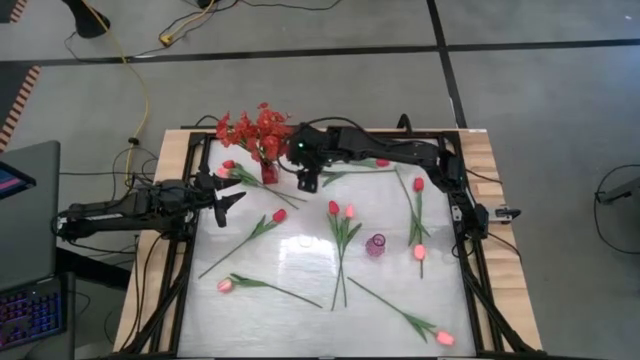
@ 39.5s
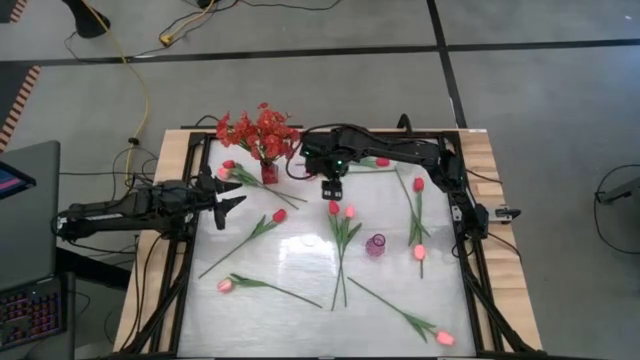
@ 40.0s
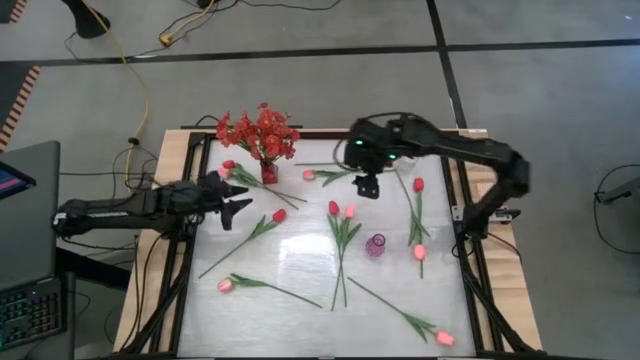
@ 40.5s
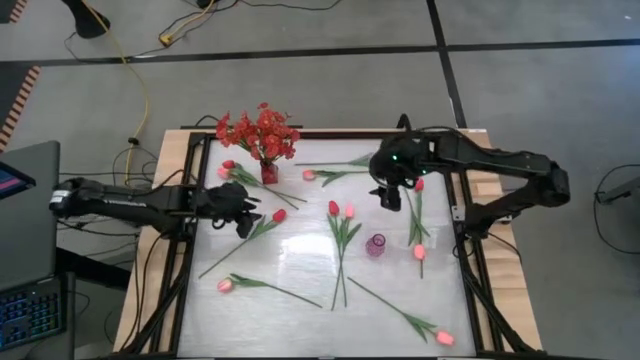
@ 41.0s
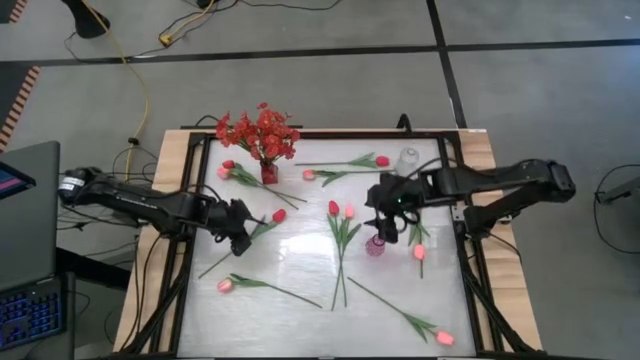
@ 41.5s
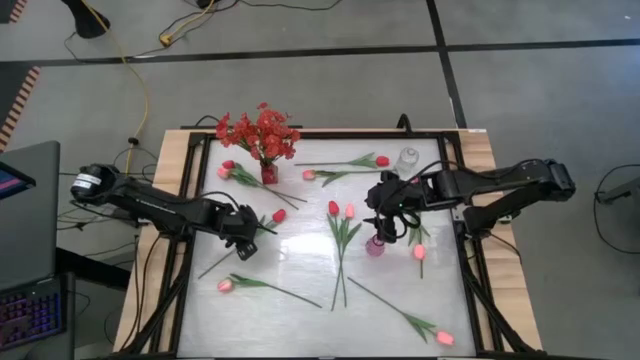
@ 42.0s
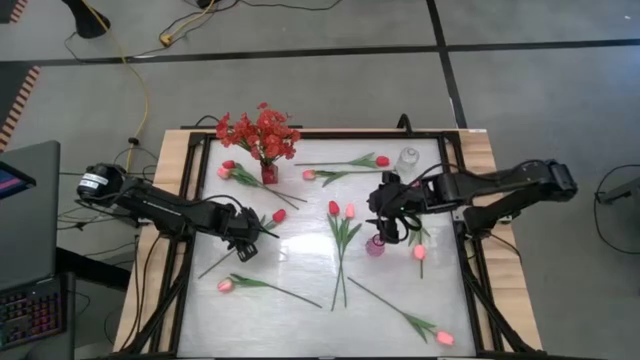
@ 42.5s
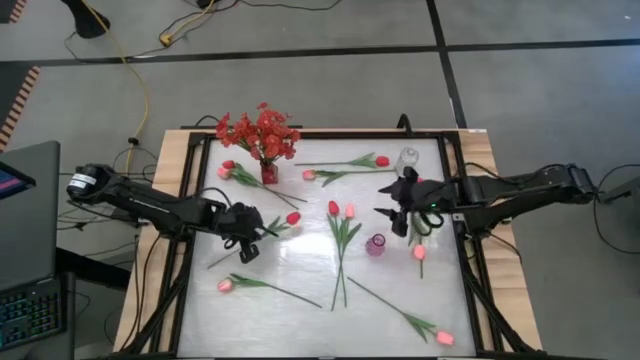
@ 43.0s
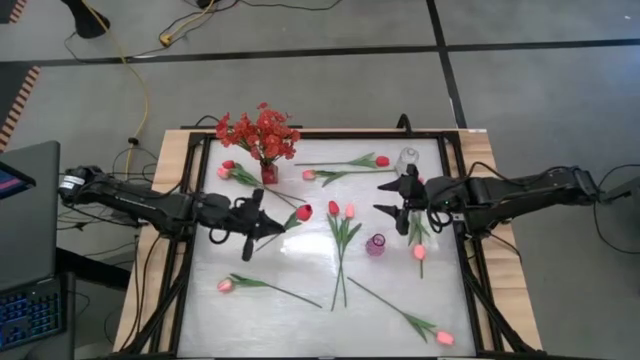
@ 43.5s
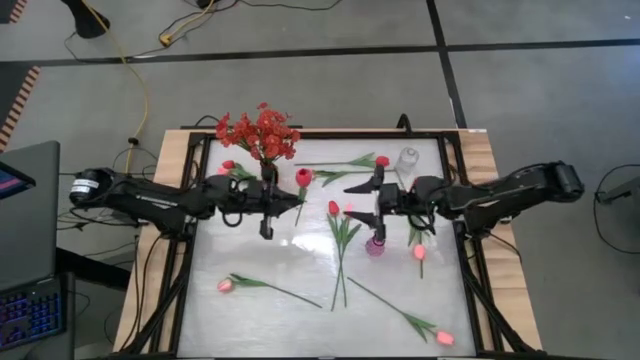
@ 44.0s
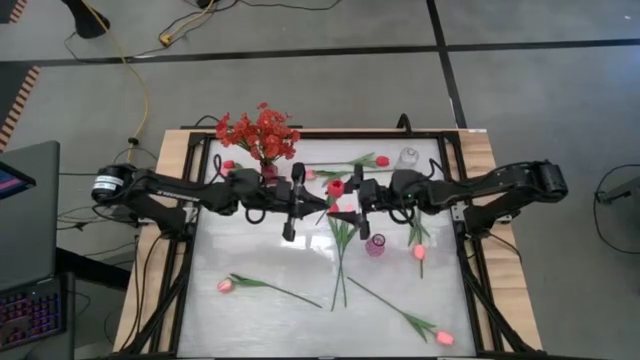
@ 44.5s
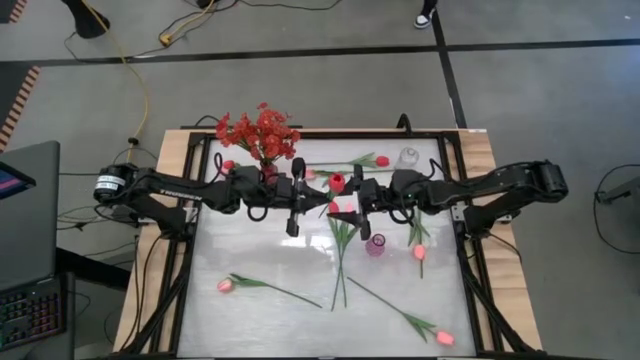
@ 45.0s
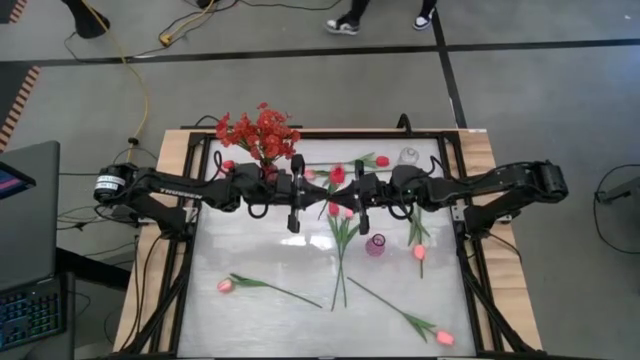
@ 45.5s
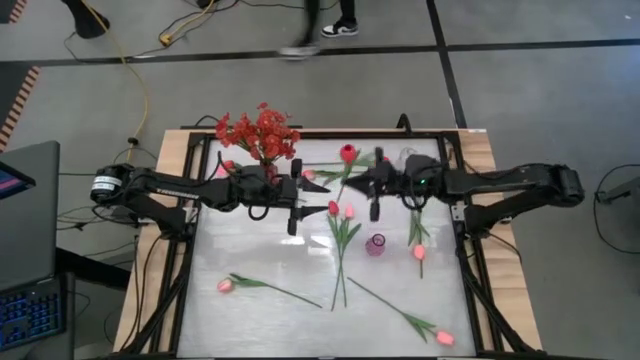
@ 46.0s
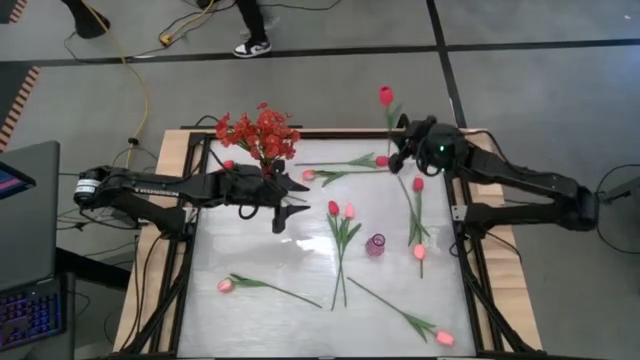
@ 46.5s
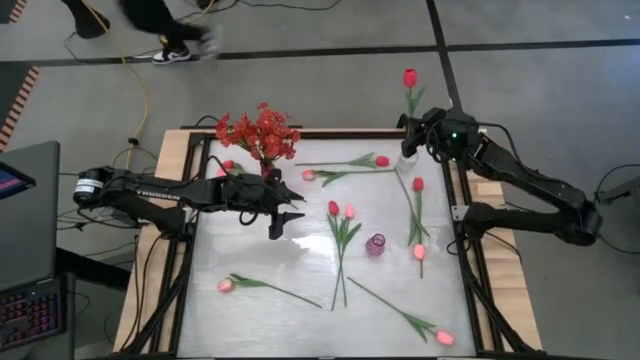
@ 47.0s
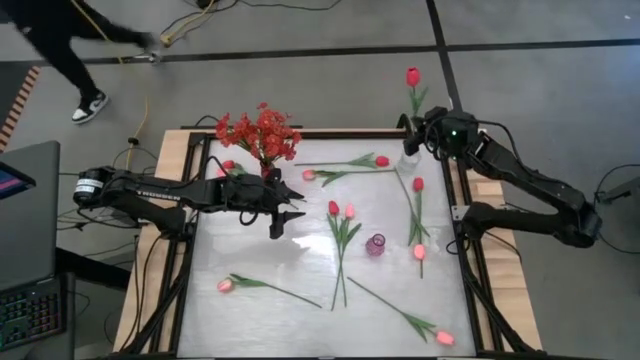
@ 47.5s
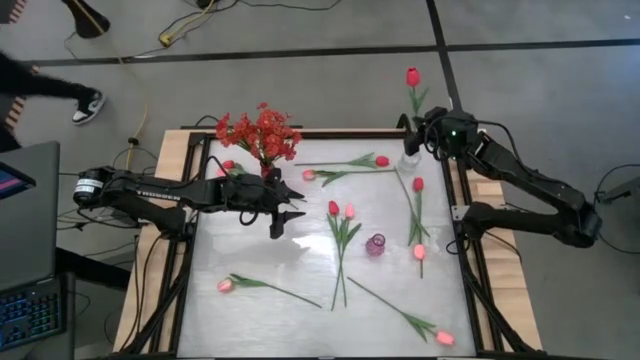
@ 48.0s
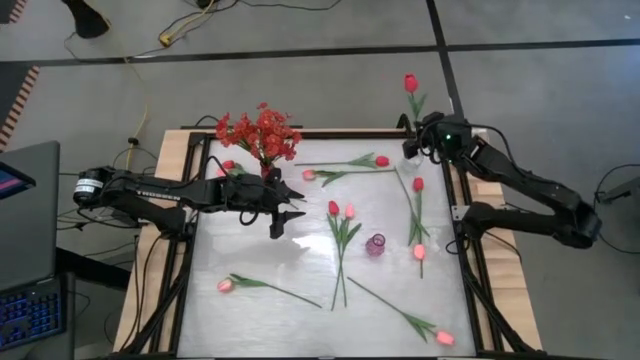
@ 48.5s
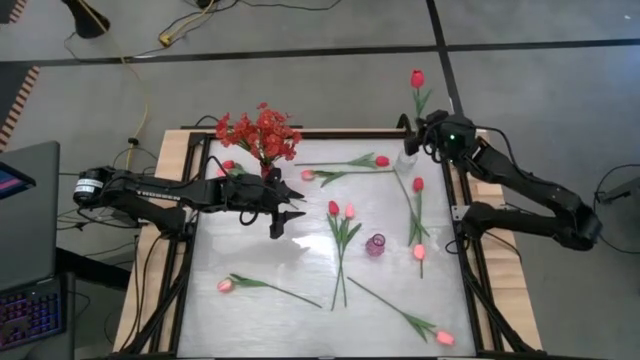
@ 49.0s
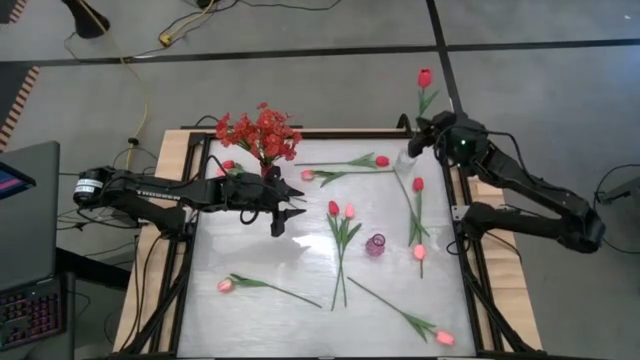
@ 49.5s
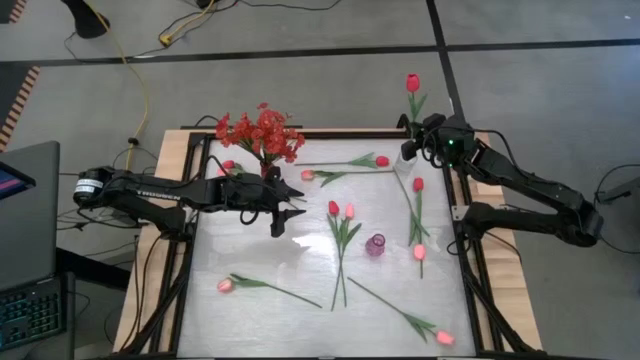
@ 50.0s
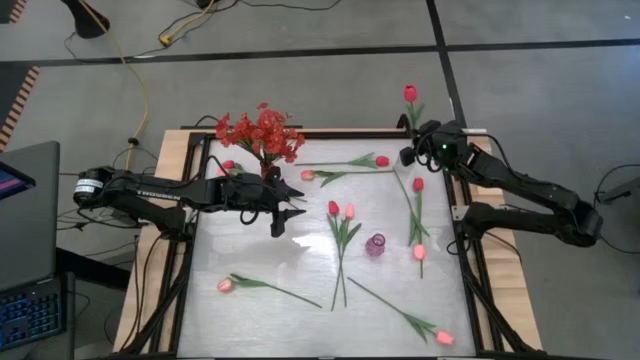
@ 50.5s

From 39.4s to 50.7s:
Task: Sort flowers into vase by color
Put the red tulip into the transparent flower vase

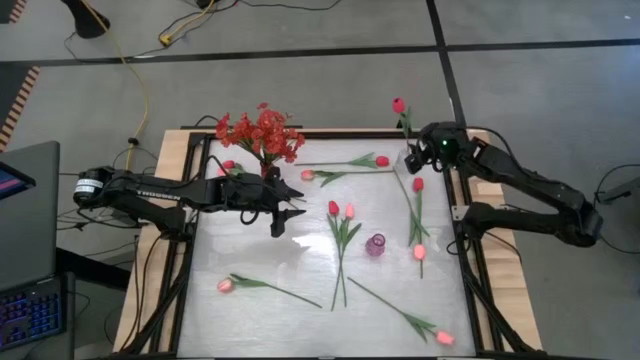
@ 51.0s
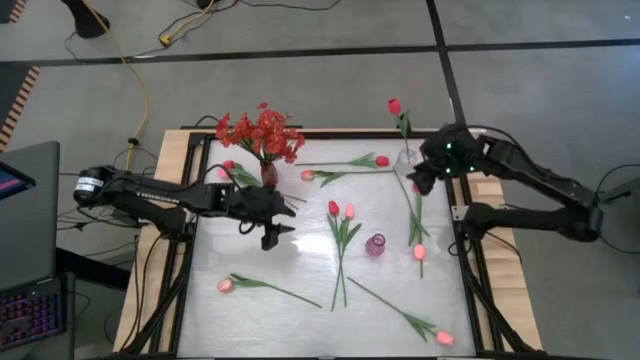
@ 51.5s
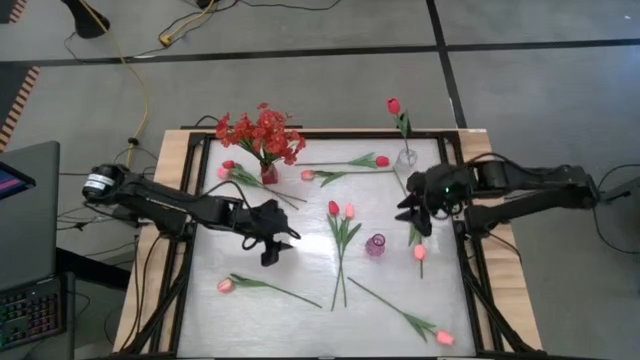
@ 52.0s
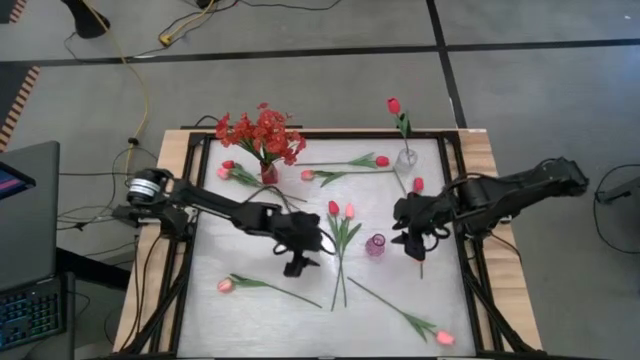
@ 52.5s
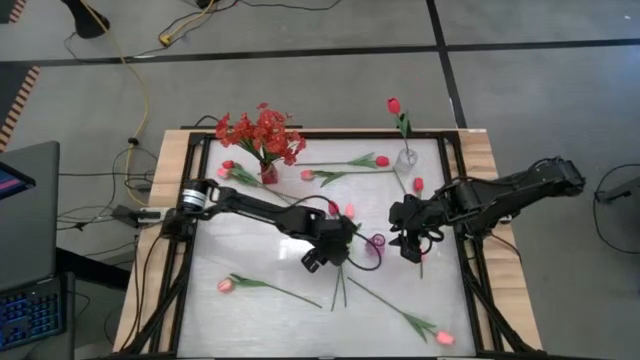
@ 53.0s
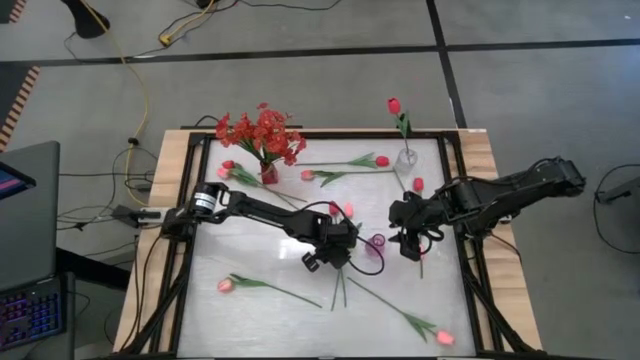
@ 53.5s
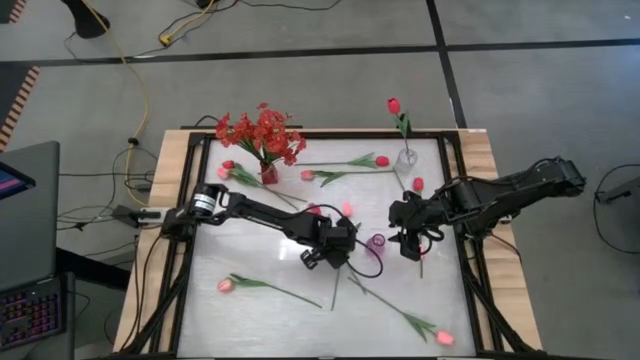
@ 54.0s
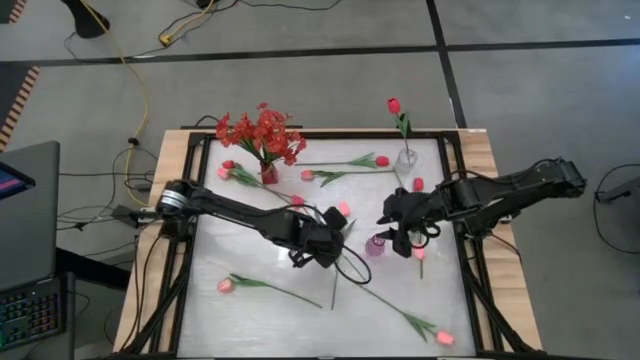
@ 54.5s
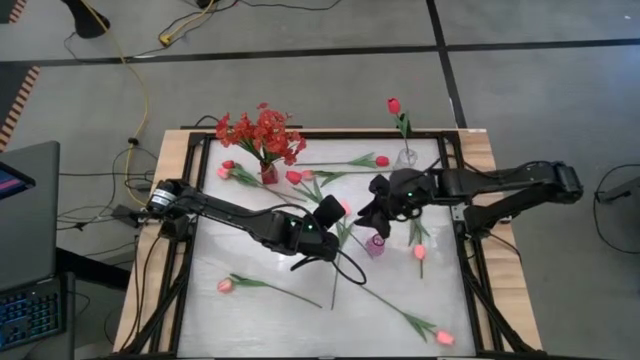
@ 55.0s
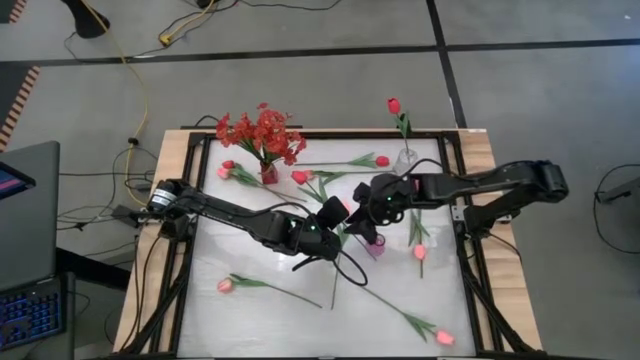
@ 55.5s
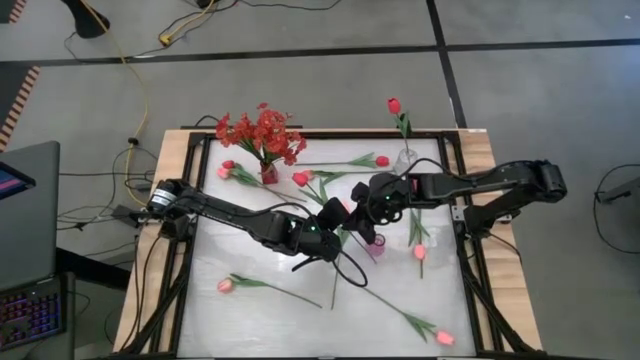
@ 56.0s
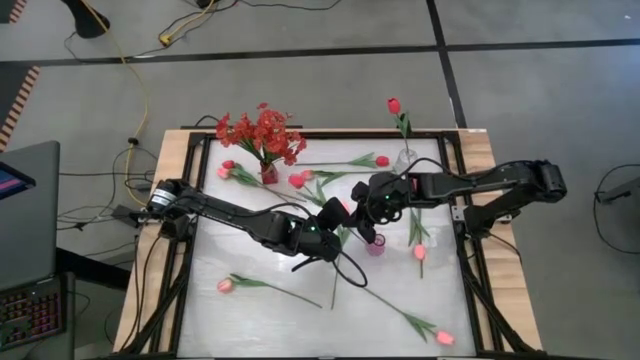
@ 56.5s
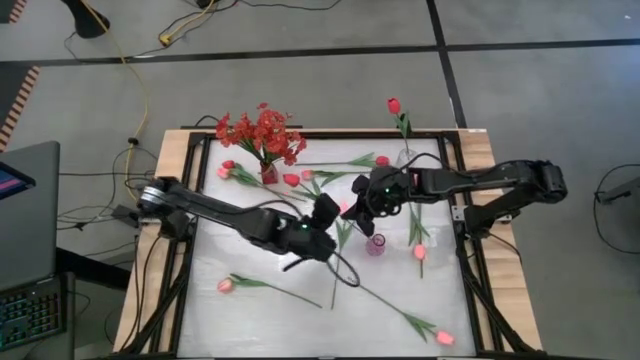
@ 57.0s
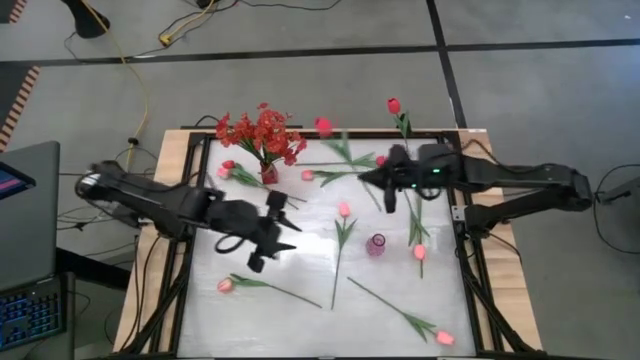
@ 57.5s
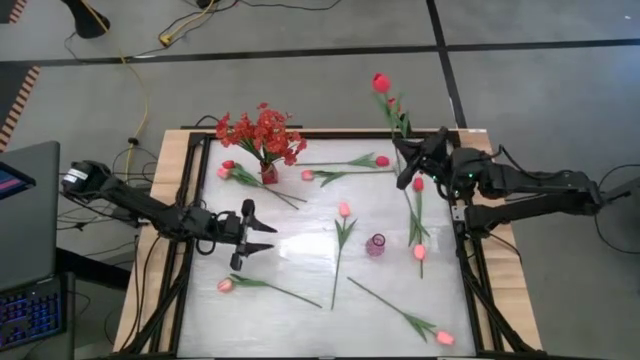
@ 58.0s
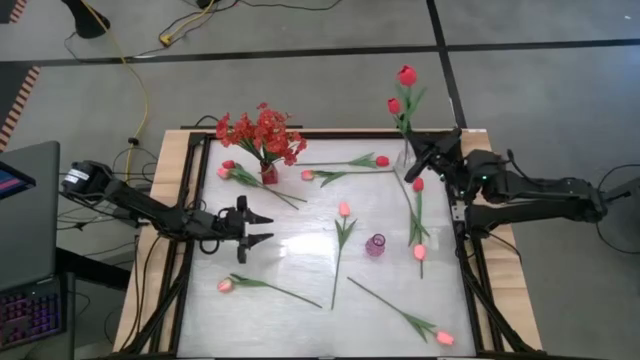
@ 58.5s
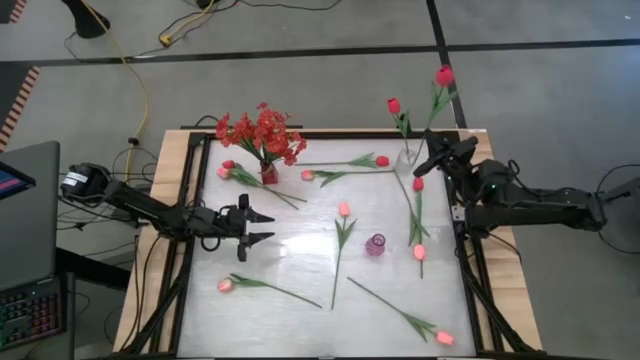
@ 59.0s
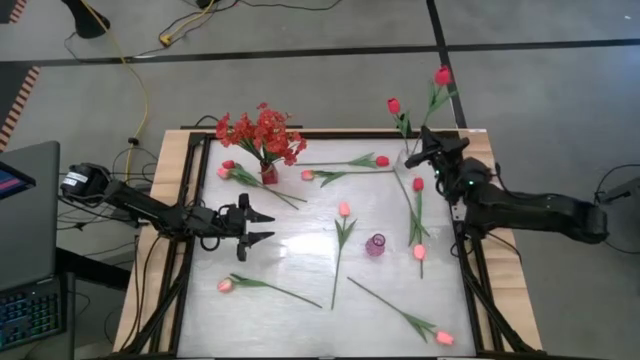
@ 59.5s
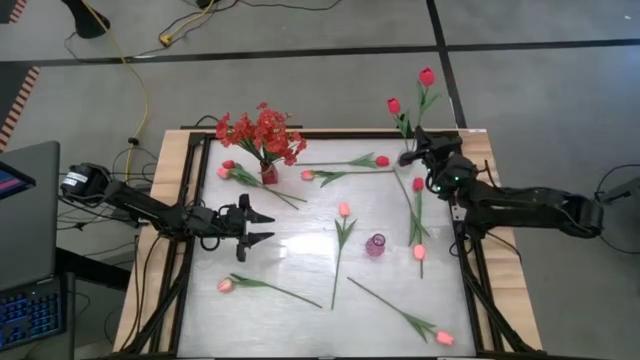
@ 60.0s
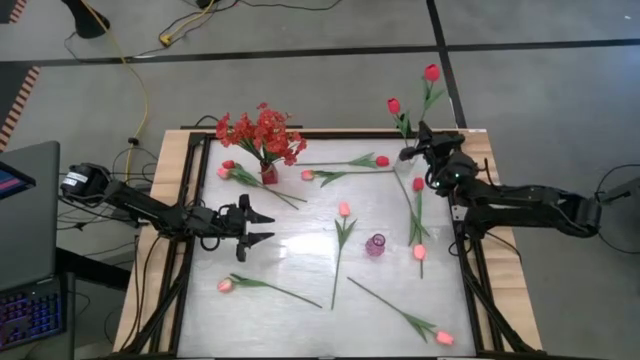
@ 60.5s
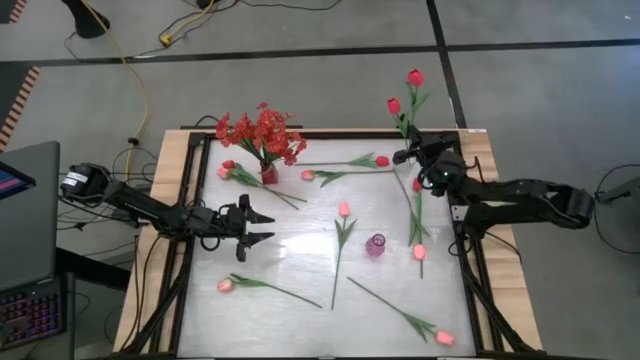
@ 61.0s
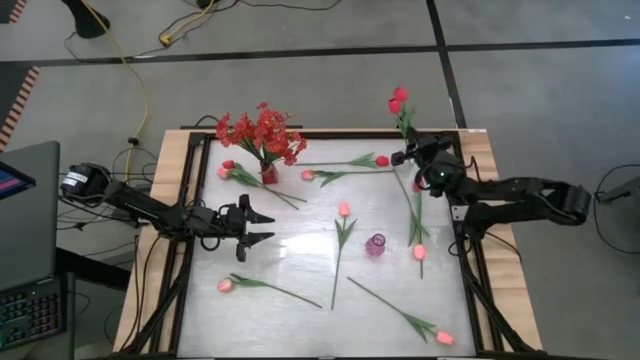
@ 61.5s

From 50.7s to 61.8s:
Put the red tulip into the transparent flower vase
